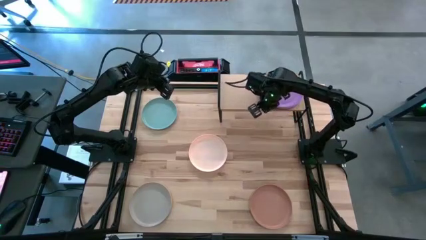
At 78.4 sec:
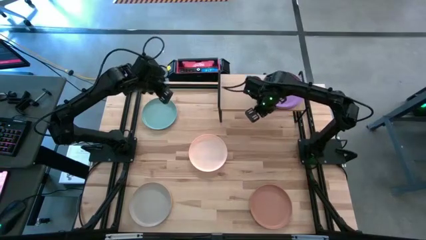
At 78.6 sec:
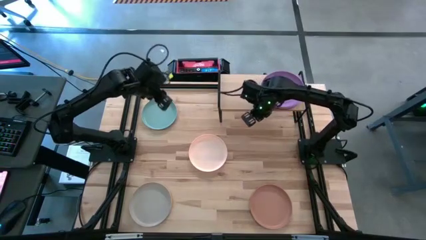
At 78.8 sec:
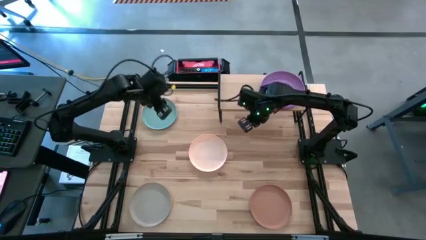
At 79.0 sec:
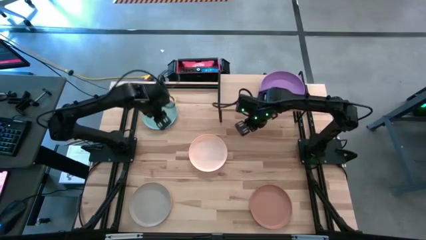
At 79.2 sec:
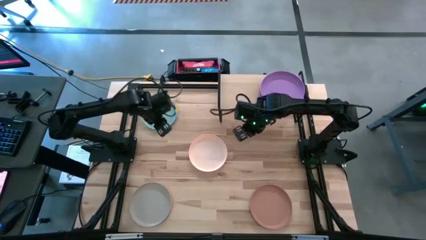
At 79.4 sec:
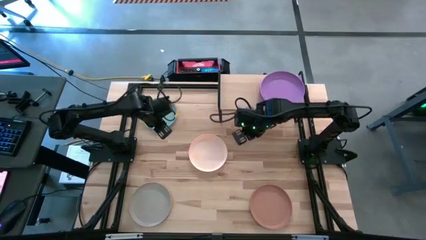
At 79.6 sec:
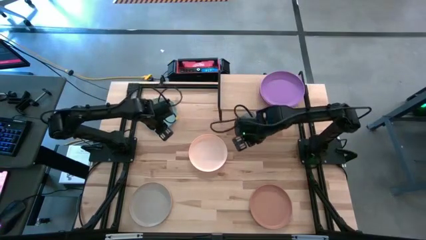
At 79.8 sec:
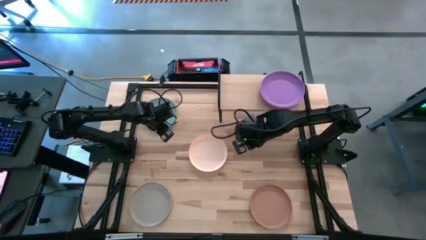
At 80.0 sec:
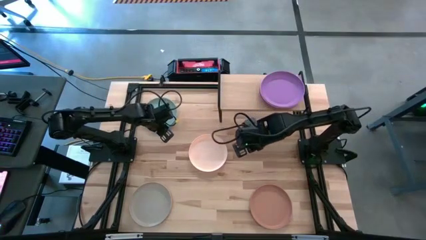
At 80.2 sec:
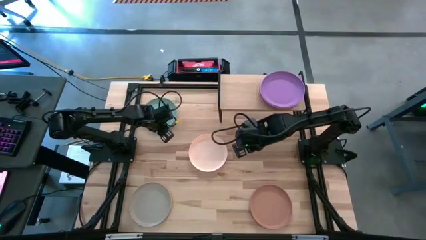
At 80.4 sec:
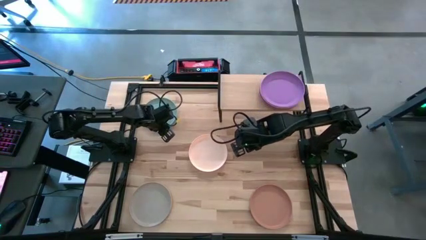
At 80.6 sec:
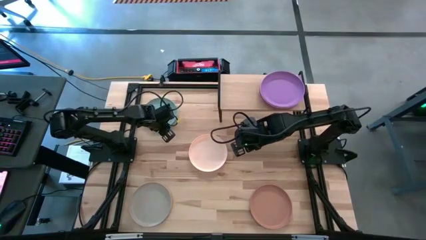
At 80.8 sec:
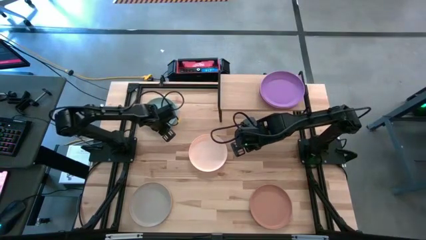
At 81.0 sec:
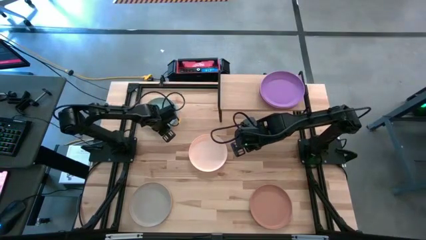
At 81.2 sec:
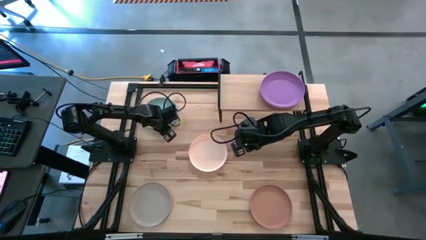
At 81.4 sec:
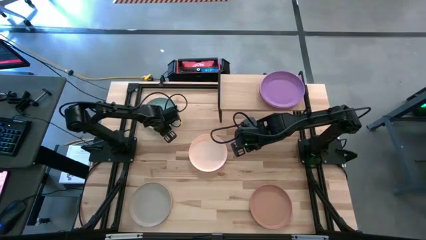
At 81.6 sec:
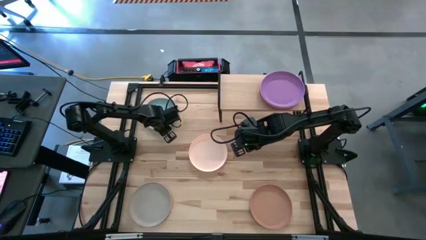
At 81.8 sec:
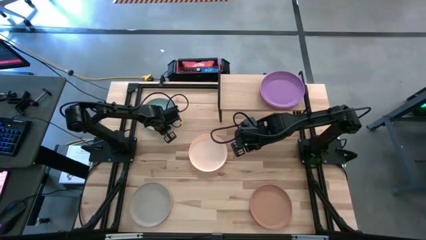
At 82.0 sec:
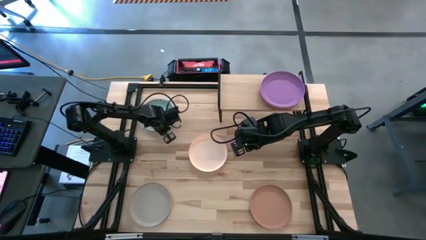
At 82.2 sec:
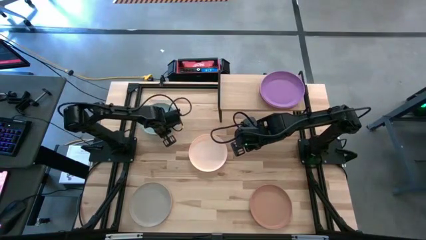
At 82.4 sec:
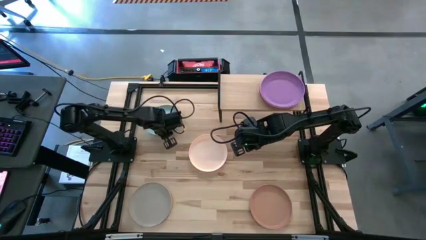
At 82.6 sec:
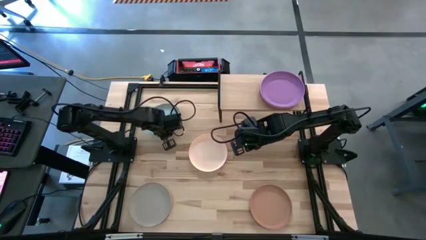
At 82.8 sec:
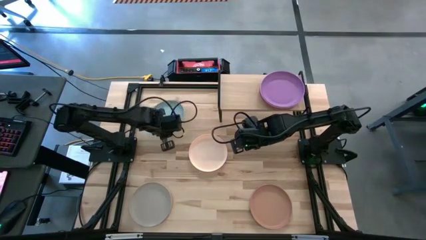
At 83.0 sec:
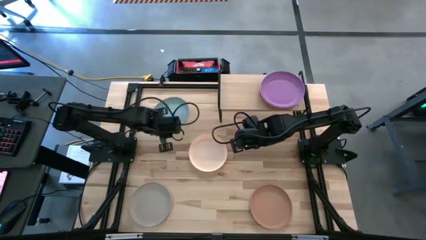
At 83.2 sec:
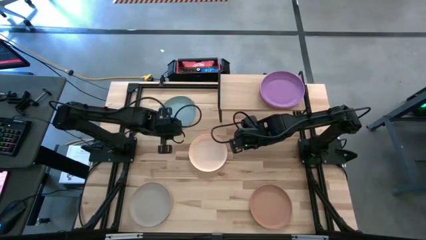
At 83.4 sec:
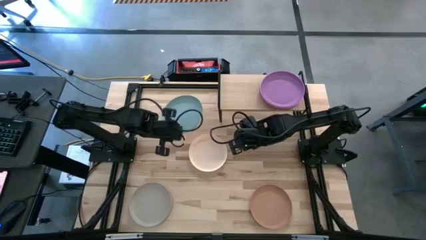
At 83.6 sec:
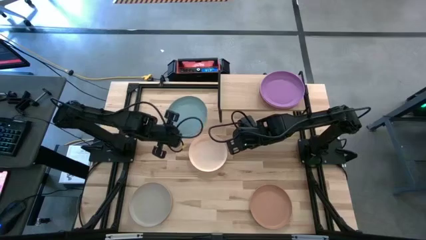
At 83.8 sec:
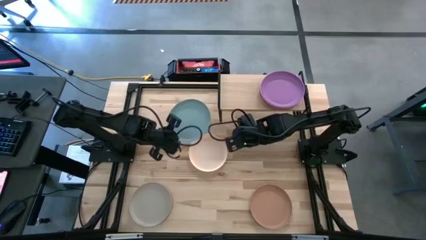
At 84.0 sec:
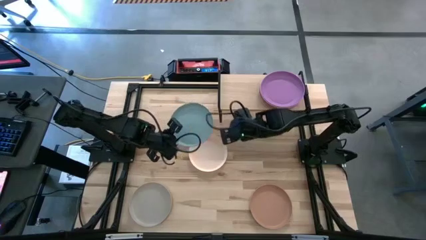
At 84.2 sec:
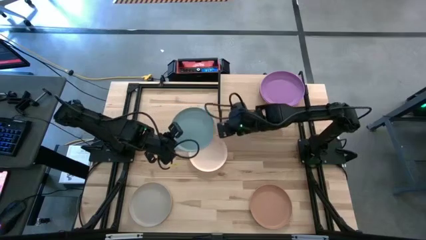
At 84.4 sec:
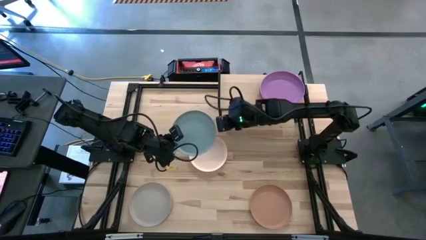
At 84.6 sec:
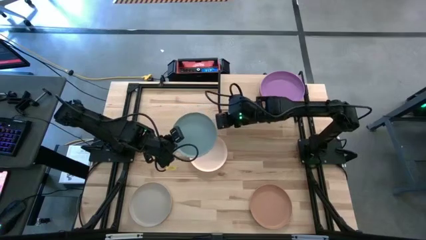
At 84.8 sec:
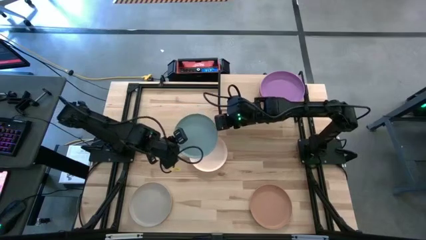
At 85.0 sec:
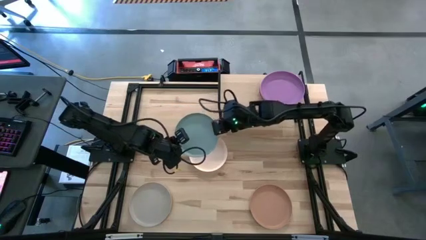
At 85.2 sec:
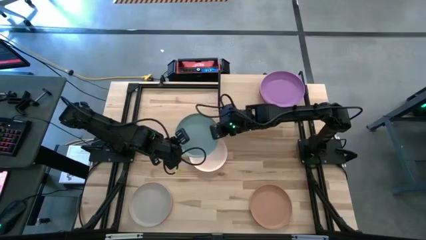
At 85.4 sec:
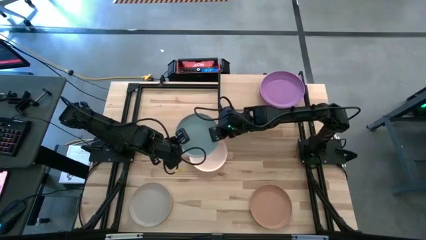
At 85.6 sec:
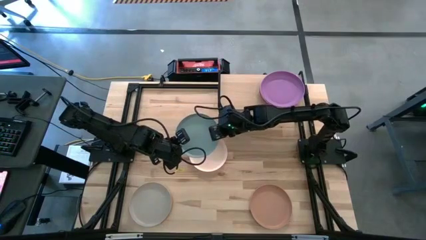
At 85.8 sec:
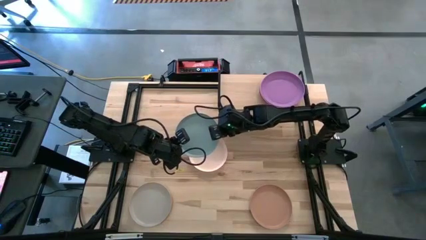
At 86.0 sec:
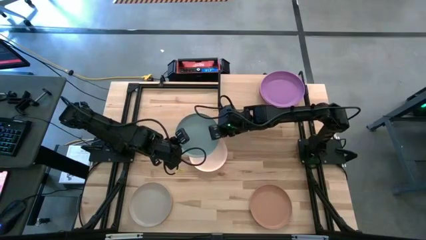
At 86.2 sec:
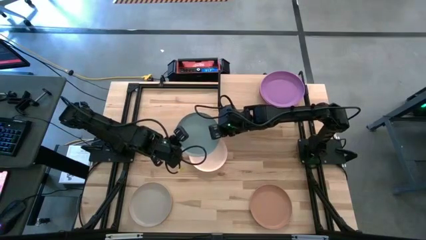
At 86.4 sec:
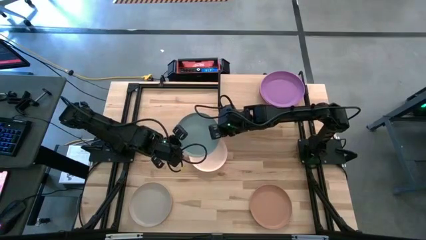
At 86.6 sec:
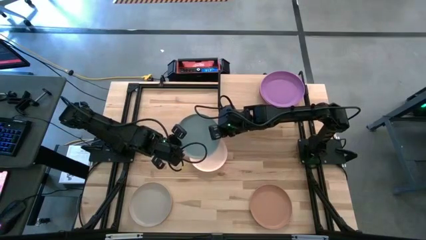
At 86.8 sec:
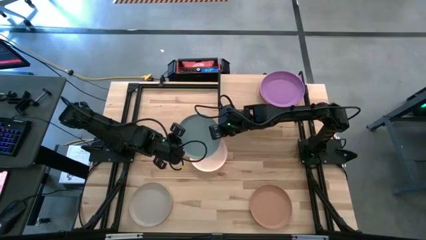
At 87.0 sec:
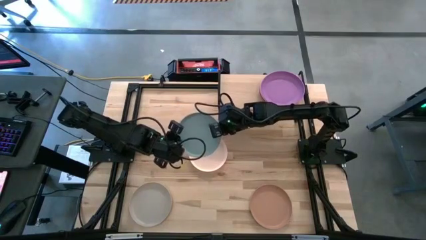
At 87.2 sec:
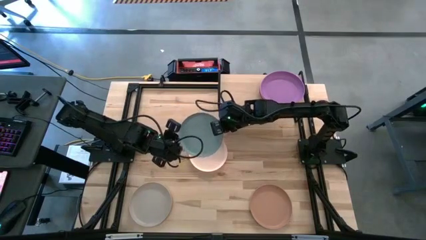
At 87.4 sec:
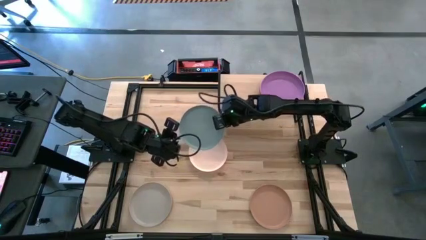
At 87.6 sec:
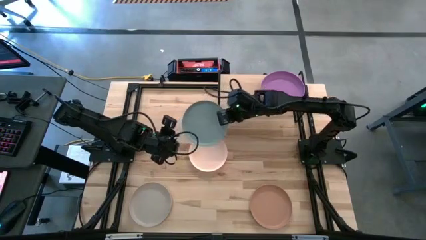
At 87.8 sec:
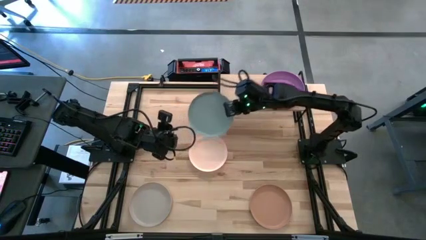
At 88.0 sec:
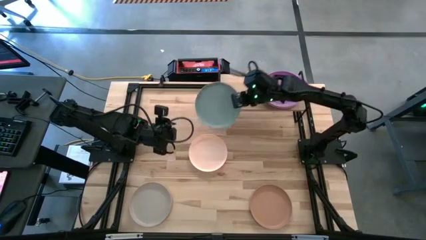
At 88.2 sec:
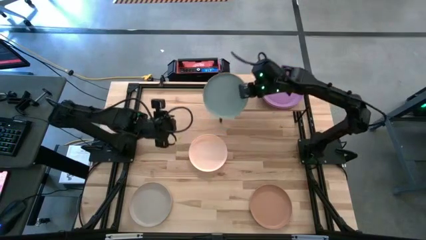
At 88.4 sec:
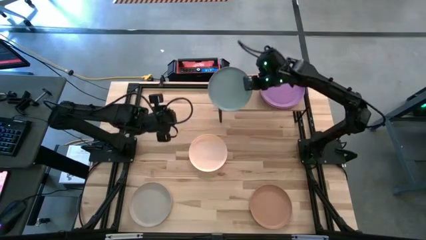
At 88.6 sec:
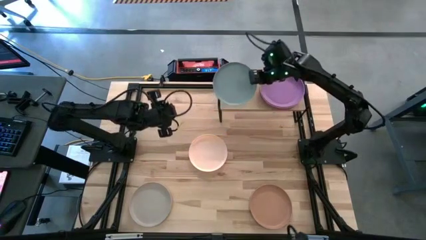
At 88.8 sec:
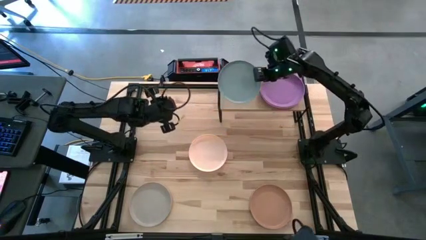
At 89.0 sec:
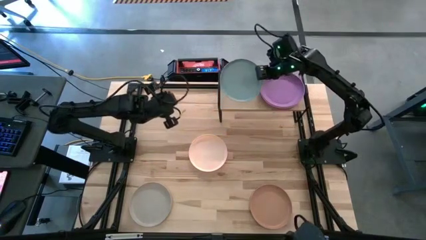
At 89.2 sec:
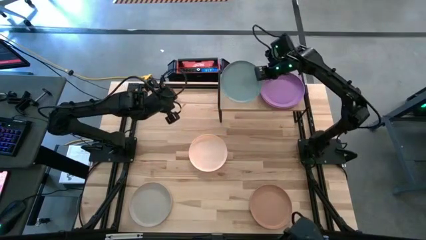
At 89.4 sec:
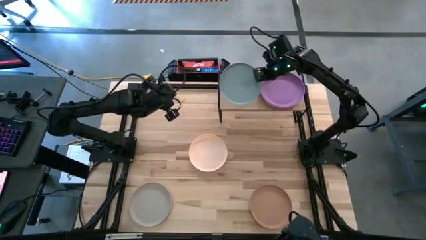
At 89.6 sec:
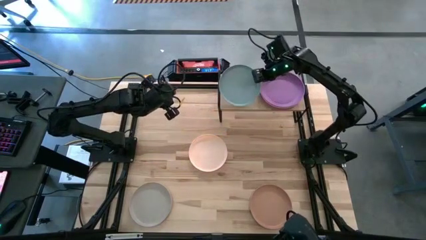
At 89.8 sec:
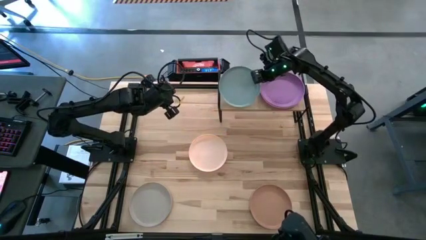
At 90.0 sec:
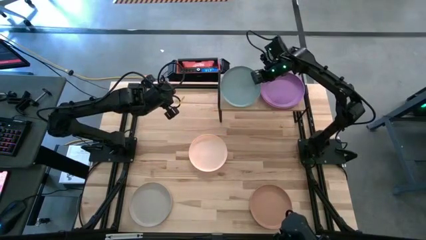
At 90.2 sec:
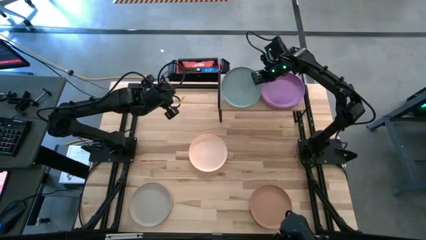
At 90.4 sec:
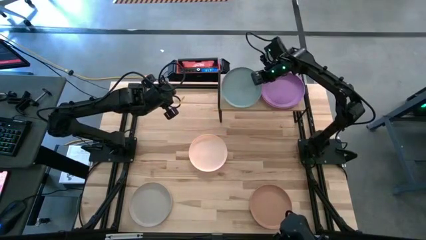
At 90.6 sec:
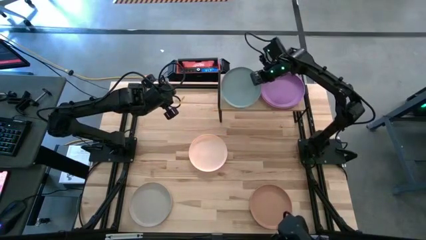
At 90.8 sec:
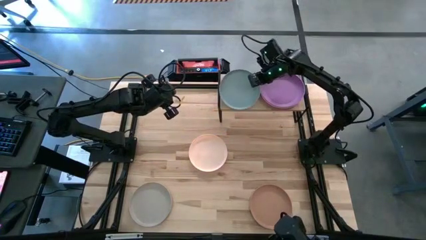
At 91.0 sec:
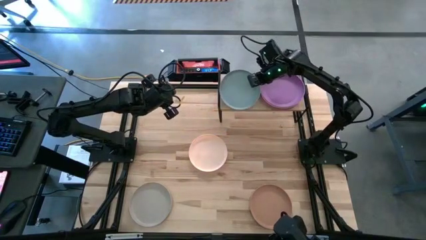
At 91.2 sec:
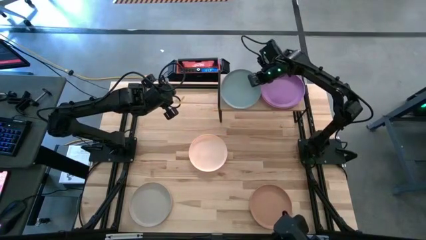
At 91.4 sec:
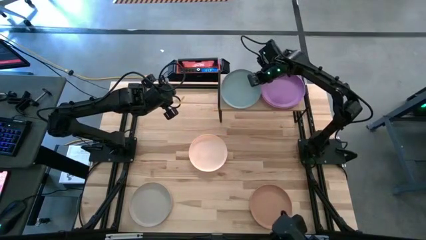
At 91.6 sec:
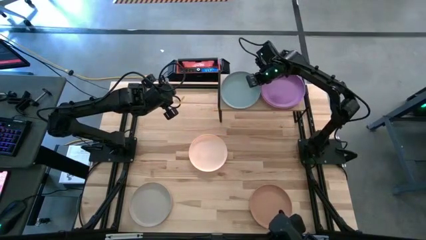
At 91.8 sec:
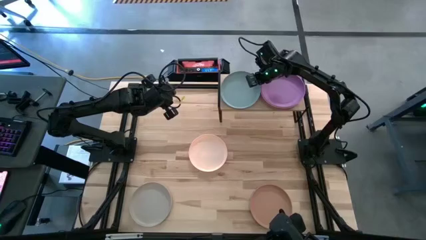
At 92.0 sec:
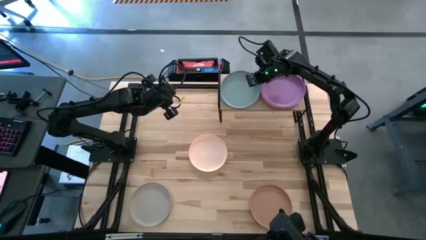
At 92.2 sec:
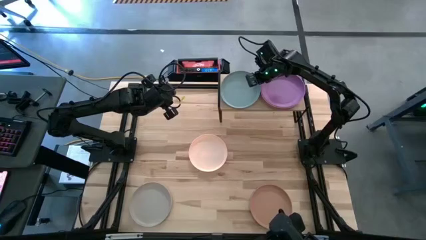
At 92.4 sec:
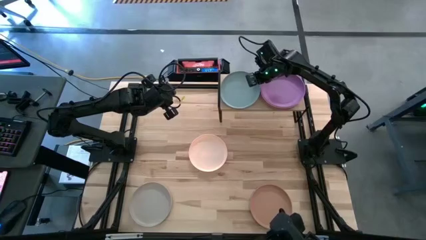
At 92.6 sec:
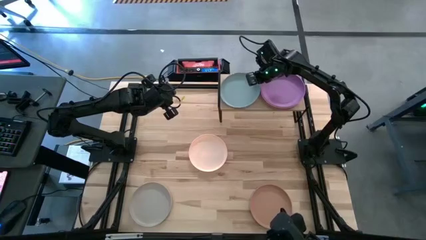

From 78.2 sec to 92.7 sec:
Task: Place and stack plates onto a shelf
Put the light blue plate on the shelf
